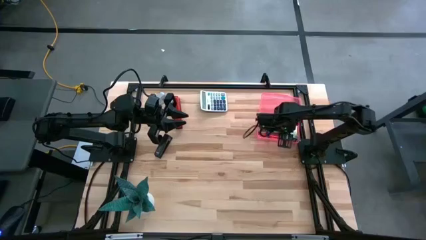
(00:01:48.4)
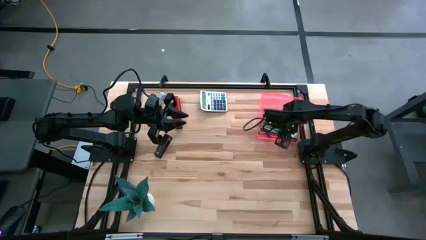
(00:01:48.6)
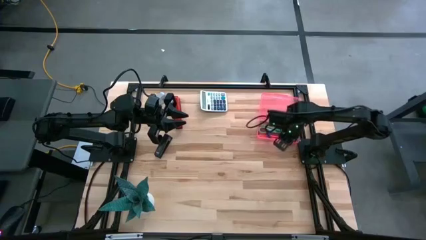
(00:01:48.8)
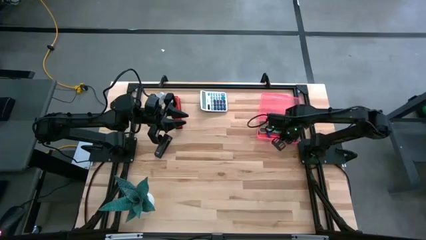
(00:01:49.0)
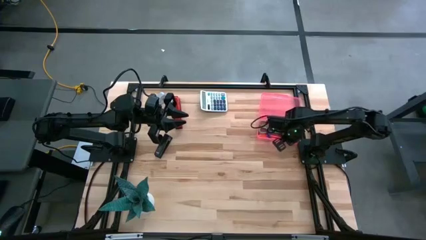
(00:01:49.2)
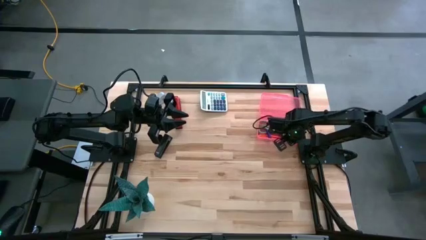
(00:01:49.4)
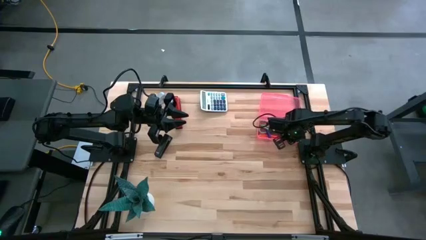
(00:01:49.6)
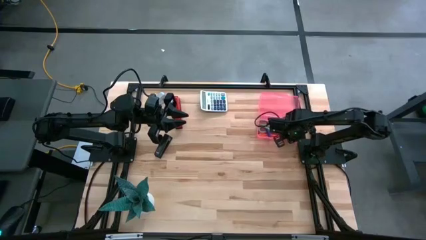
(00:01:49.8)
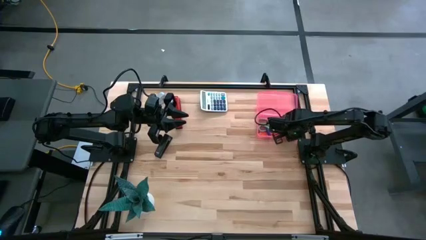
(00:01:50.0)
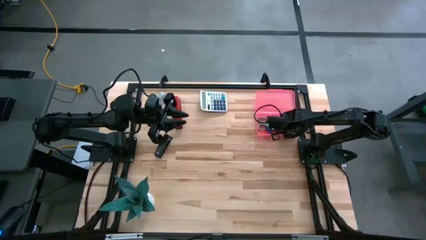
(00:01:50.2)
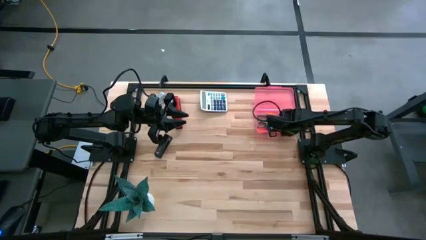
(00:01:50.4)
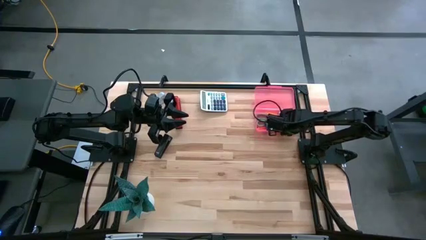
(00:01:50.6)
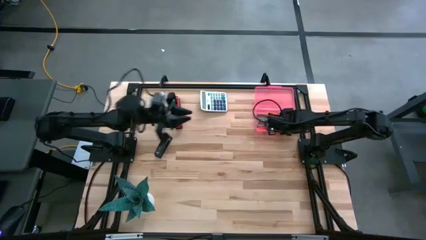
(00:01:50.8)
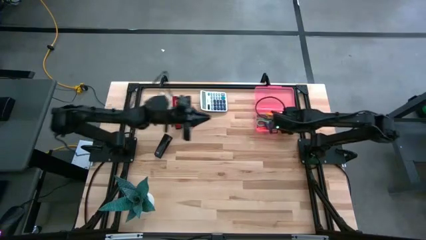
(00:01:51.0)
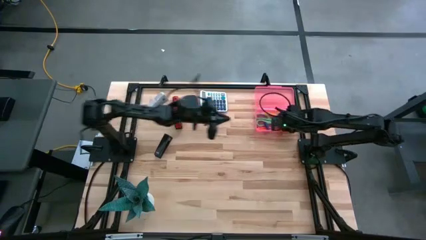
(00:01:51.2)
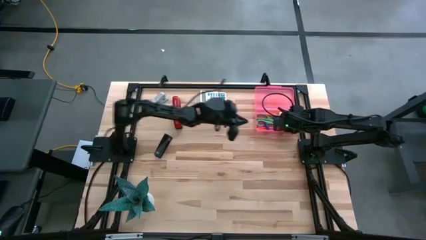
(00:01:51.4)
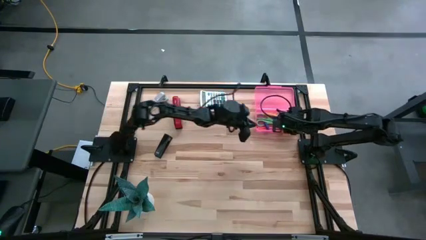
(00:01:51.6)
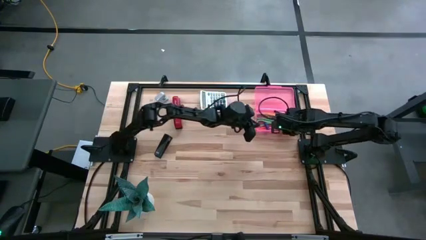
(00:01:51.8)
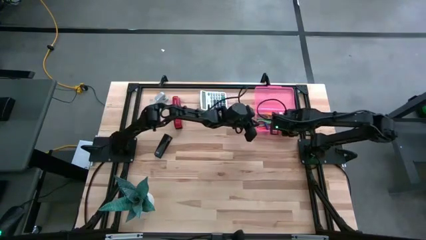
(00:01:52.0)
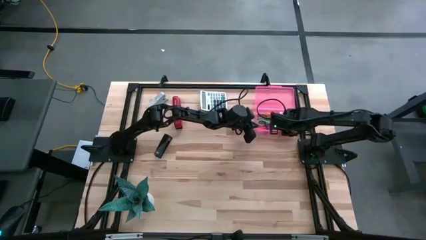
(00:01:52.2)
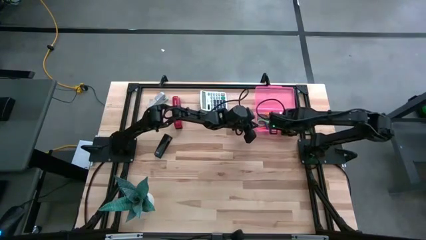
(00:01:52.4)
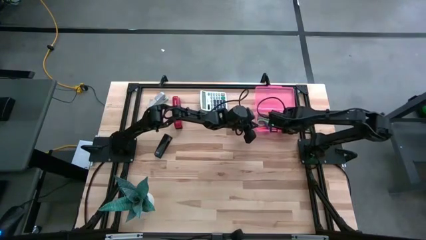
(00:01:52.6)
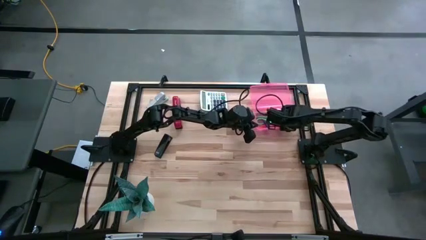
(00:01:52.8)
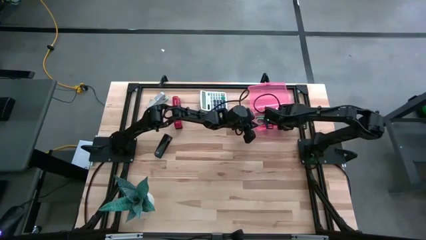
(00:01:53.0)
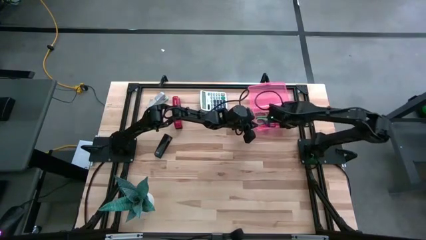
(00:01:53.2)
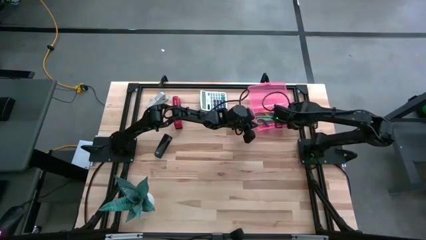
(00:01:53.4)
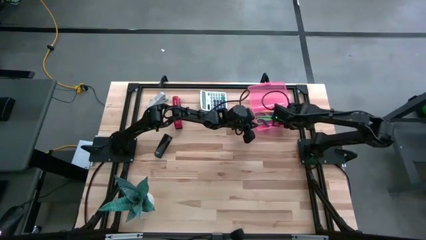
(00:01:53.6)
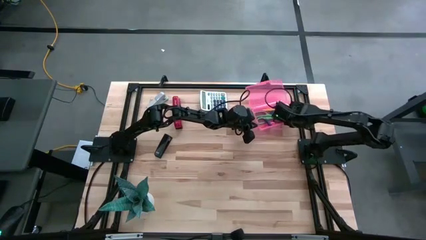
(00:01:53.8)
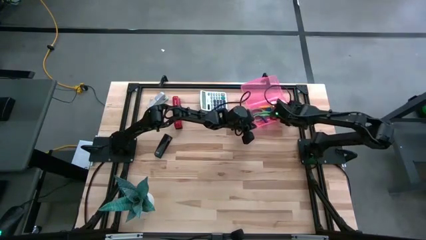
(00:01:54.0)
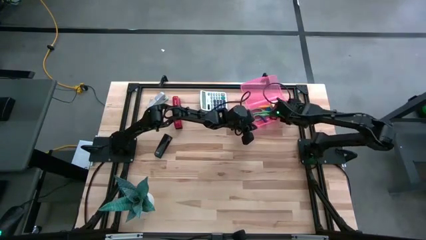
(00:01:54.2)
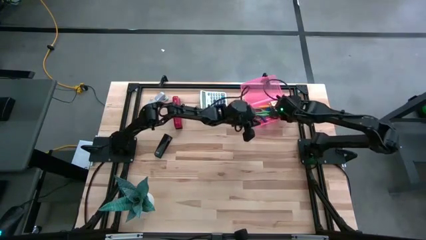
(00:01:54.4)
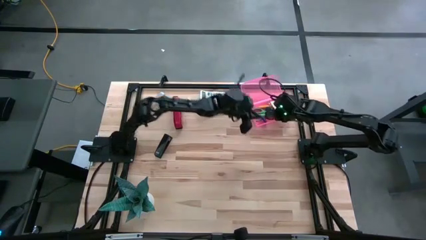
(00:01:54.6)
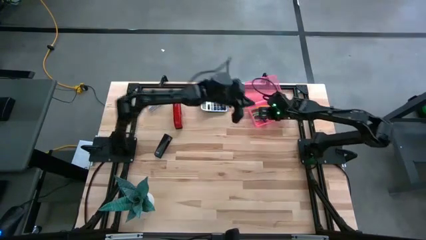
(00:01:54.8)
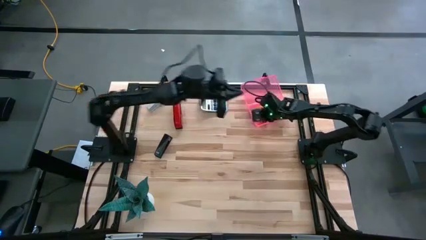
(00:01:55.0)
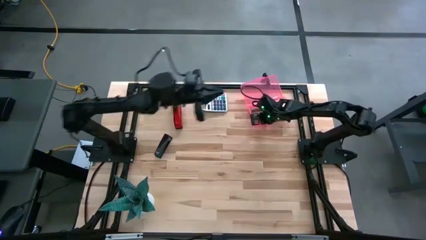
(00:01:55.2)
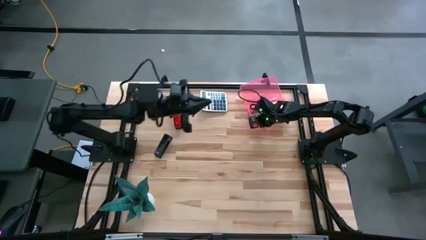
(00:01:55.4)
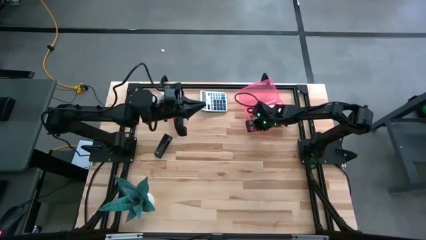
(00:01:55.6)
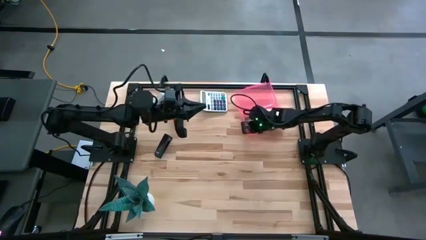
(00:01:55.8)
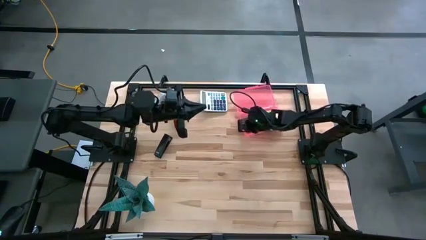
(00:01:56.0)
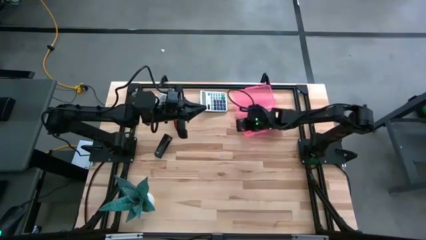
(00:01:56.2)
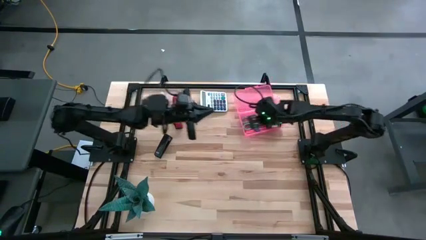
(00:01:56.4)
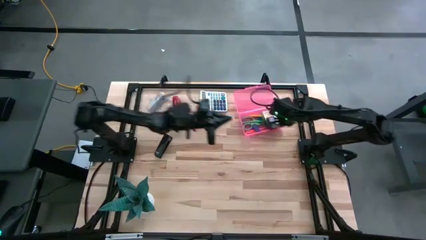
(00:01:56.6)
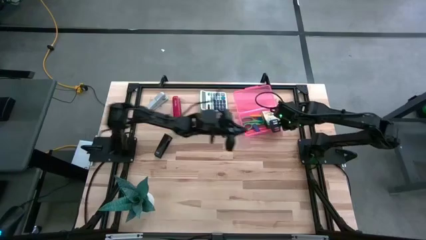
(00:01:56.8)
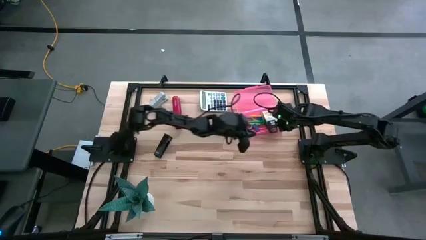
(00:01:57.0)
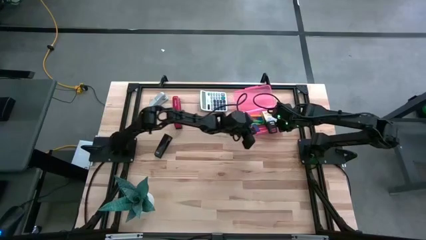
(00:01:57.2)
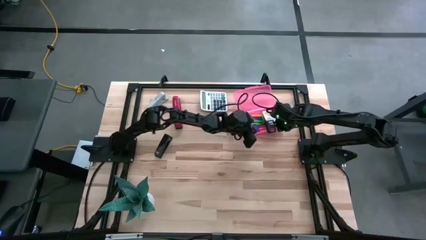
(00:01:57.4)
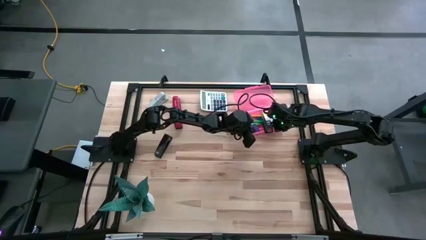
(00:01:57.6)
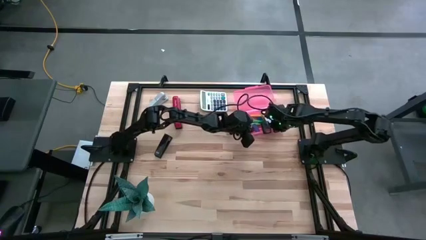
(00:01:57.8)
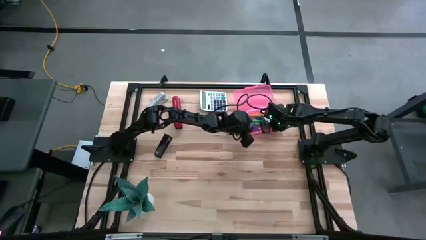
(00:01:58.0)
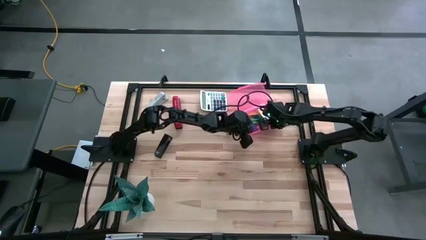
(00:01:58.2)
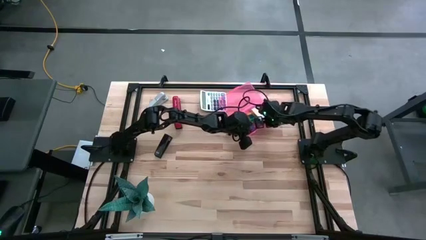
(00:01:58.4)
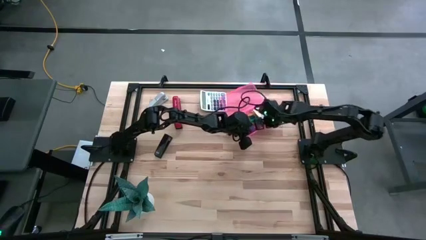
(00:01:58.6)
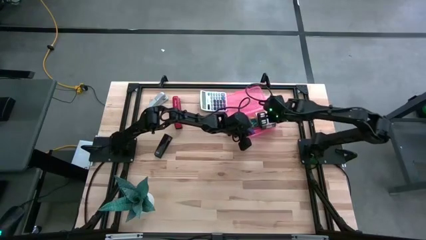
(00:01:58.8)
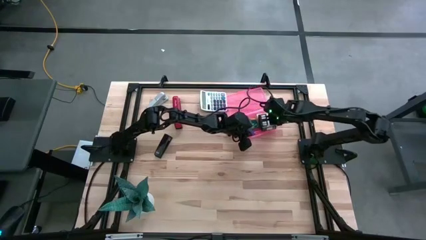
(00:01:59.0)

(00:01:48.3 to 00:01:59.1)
Task: Pack school essentials
Adjust the pink supply box

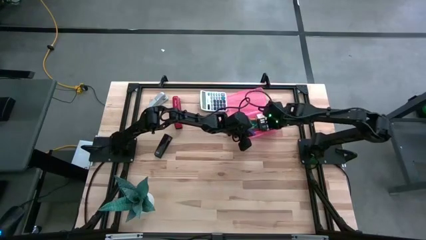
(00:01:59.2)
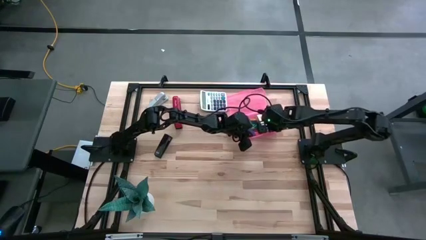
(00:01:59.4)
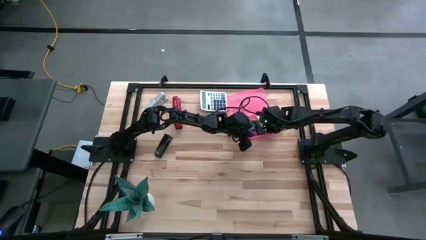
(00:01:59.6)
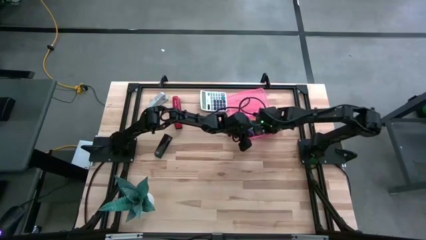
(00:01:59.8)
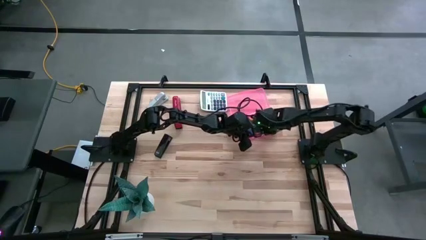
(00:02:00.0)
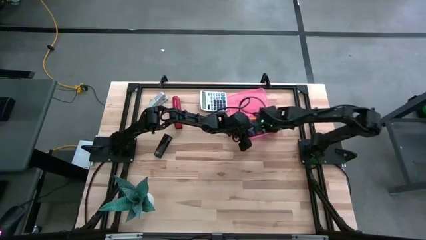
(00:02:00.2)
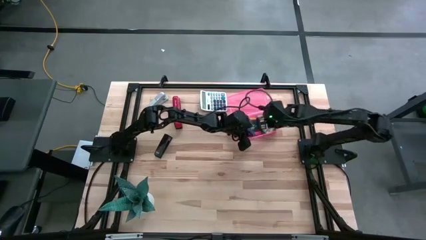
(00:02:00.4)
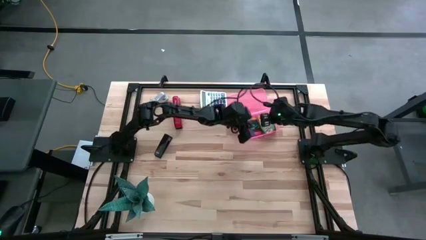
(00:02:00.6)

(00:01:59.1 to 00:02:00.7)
Adjust the yellow crayon box
